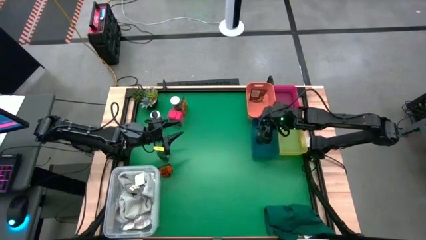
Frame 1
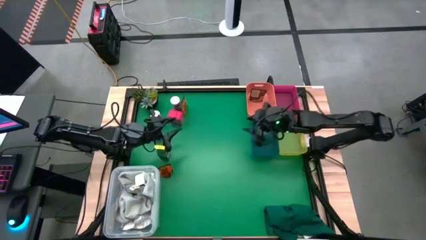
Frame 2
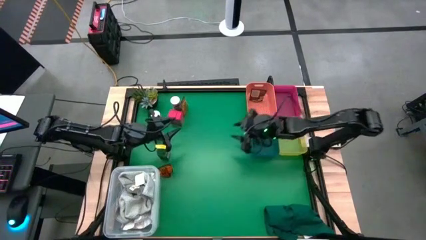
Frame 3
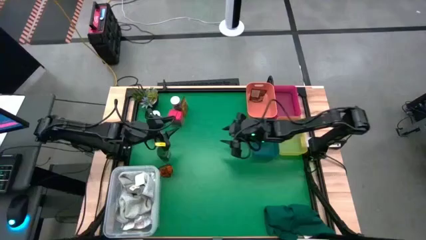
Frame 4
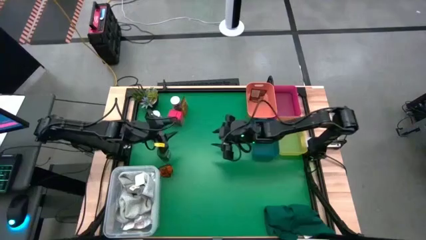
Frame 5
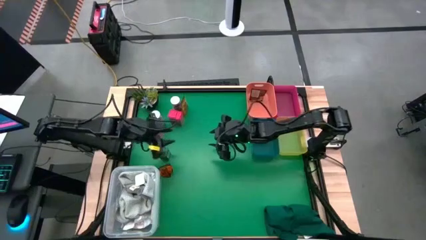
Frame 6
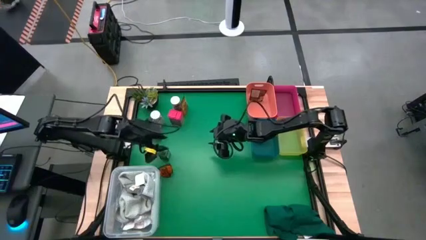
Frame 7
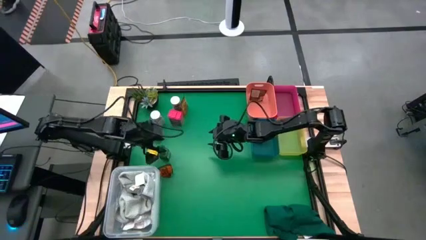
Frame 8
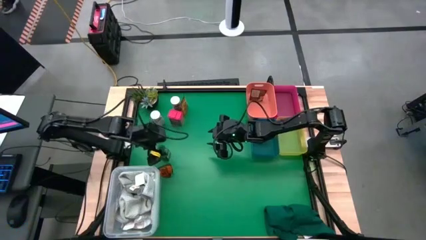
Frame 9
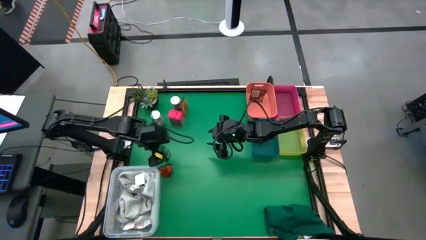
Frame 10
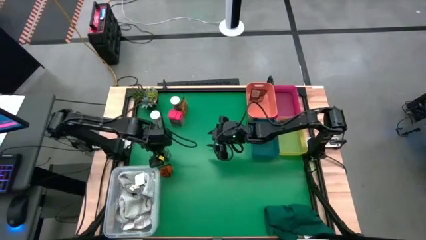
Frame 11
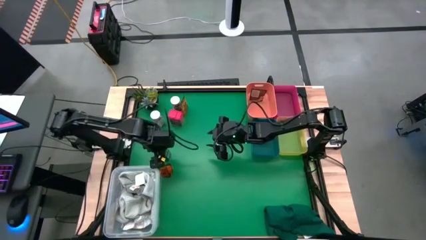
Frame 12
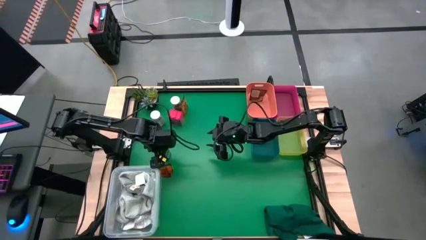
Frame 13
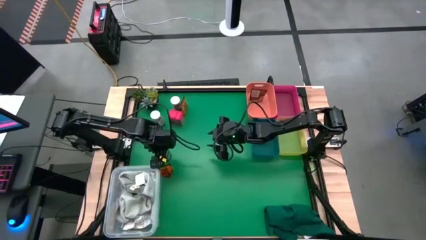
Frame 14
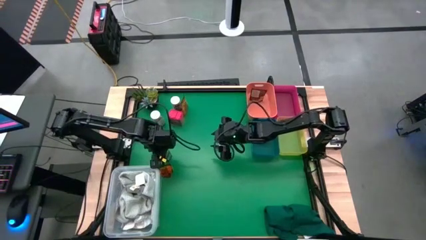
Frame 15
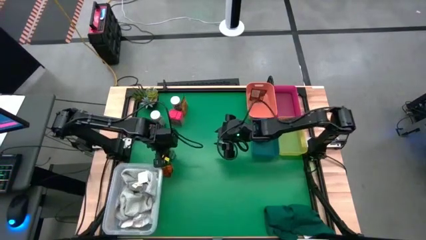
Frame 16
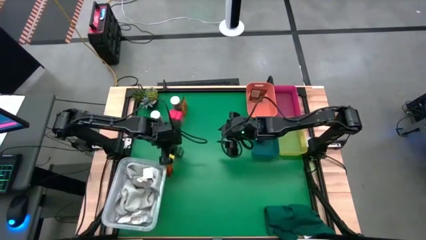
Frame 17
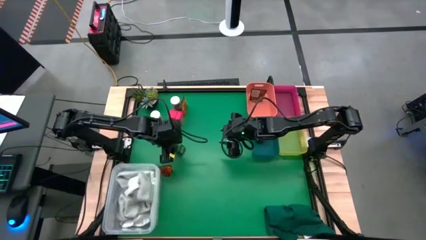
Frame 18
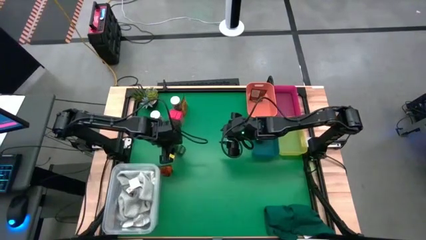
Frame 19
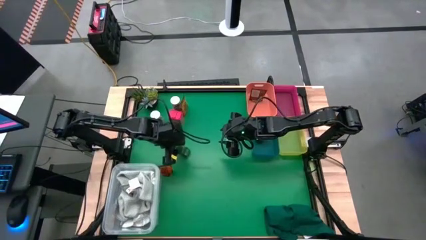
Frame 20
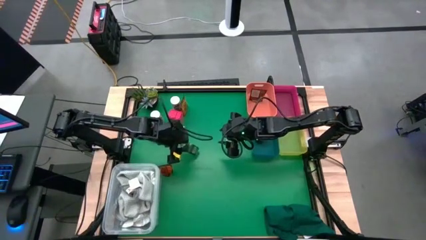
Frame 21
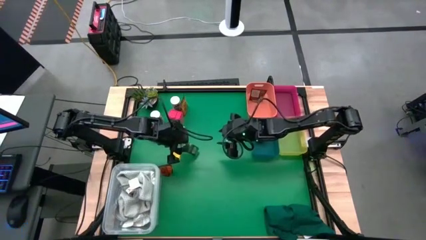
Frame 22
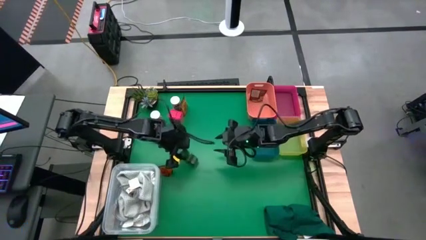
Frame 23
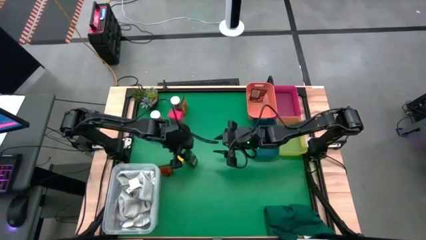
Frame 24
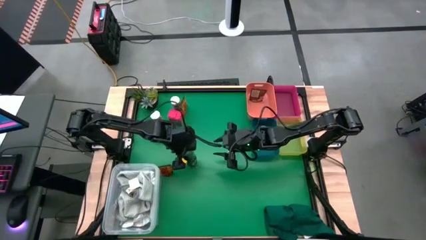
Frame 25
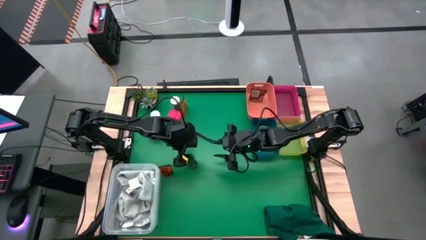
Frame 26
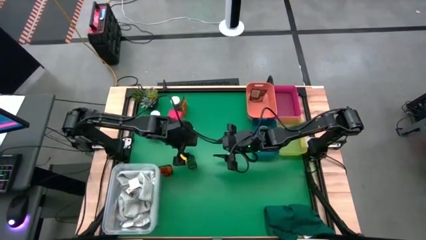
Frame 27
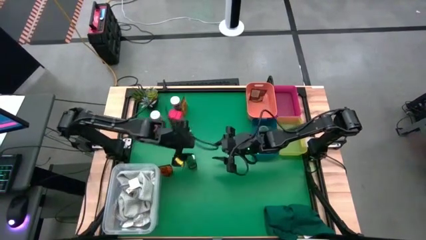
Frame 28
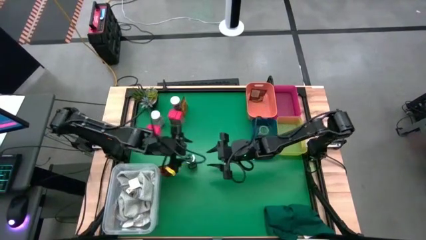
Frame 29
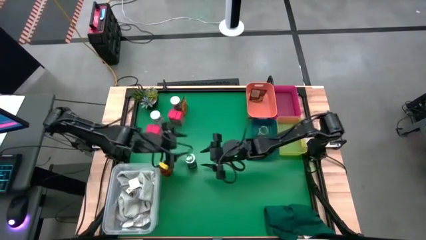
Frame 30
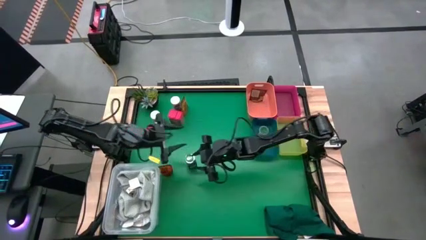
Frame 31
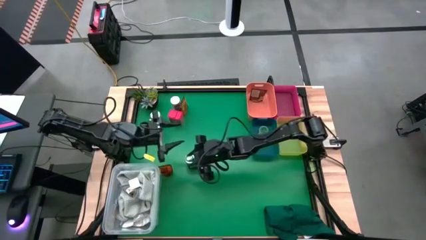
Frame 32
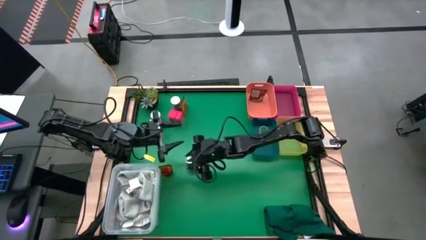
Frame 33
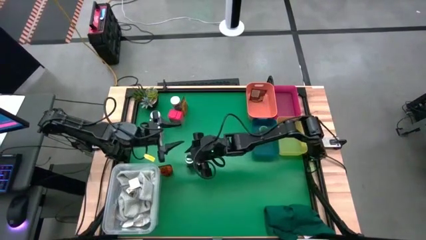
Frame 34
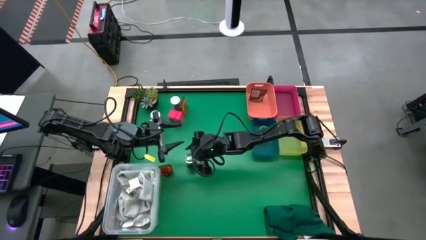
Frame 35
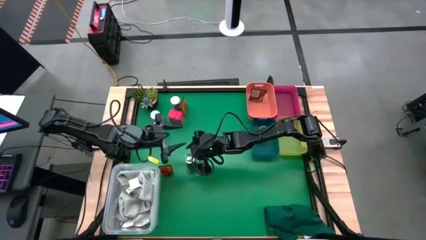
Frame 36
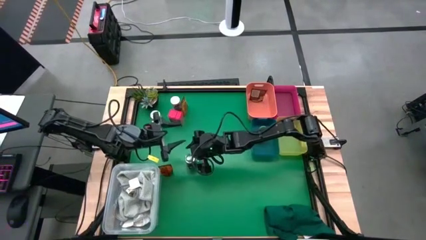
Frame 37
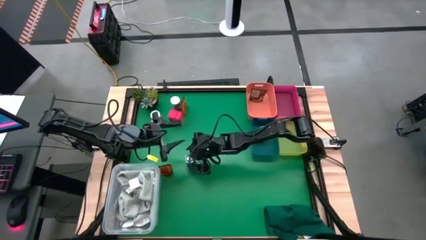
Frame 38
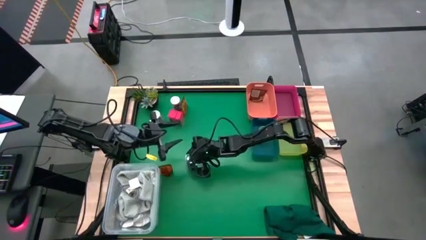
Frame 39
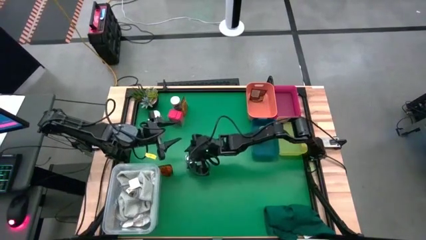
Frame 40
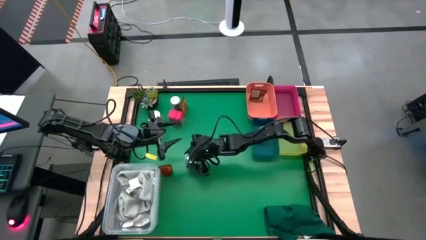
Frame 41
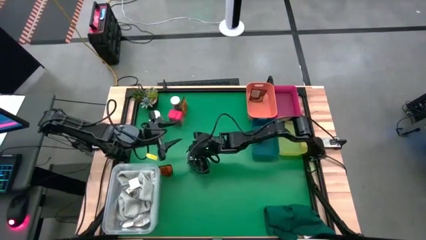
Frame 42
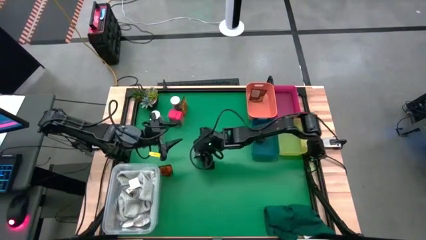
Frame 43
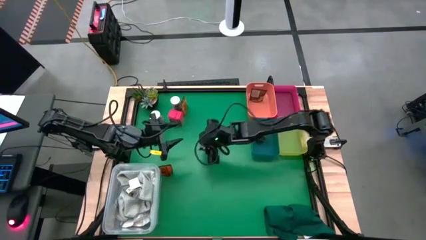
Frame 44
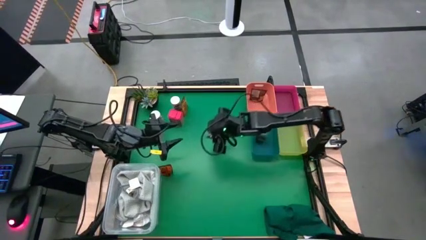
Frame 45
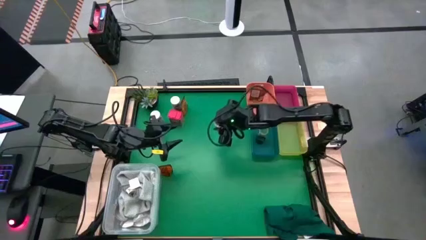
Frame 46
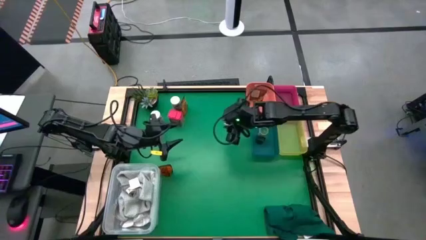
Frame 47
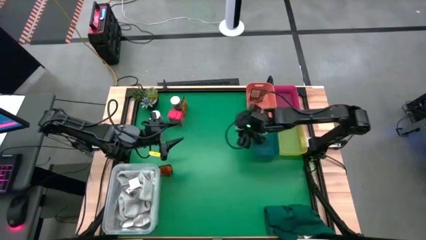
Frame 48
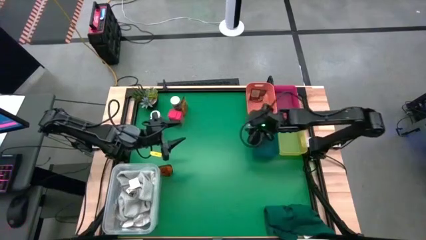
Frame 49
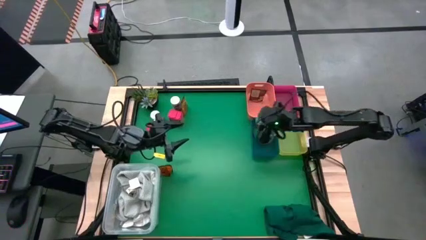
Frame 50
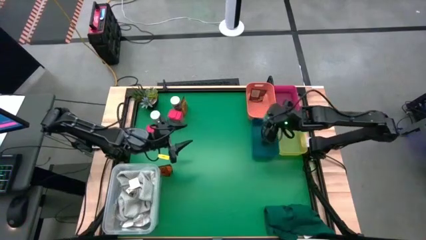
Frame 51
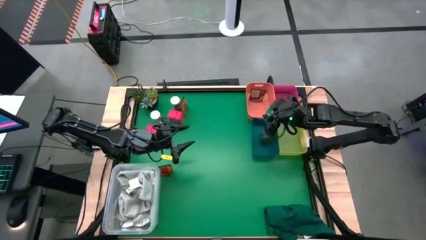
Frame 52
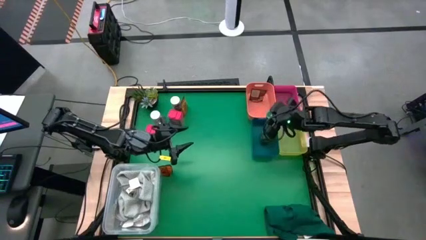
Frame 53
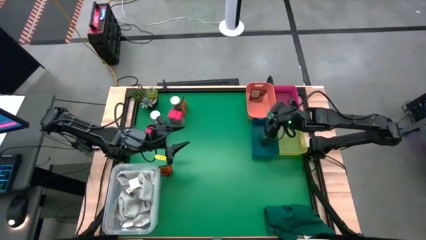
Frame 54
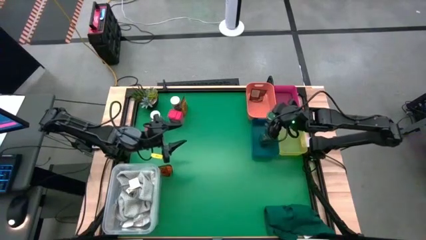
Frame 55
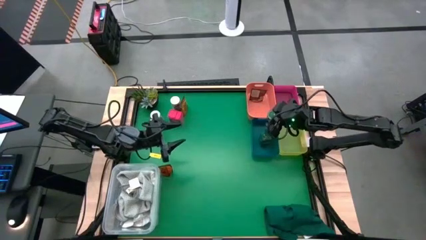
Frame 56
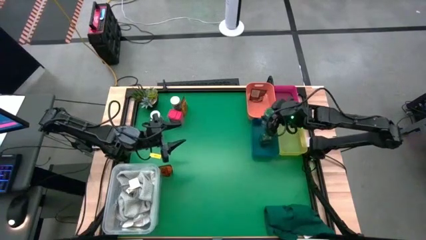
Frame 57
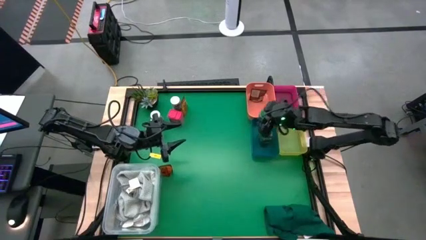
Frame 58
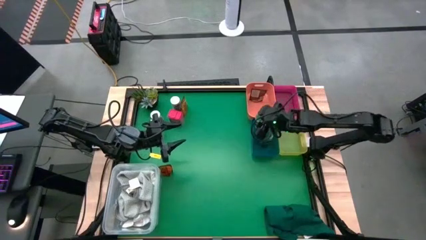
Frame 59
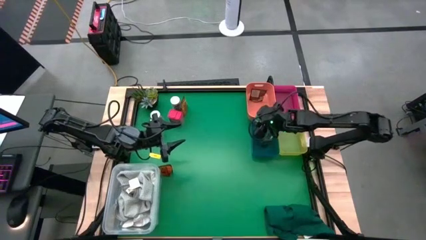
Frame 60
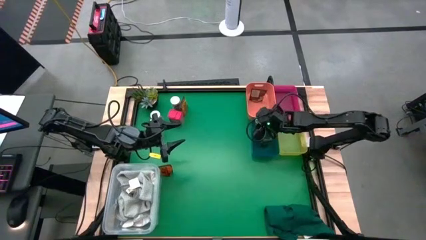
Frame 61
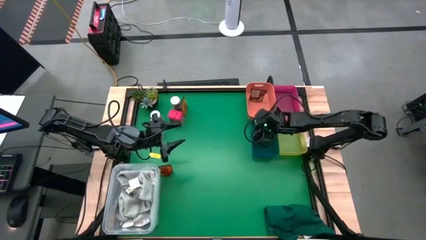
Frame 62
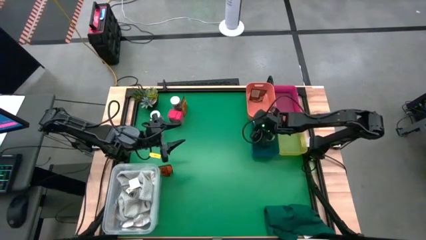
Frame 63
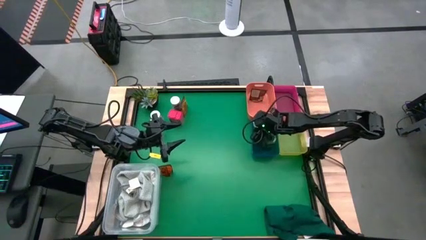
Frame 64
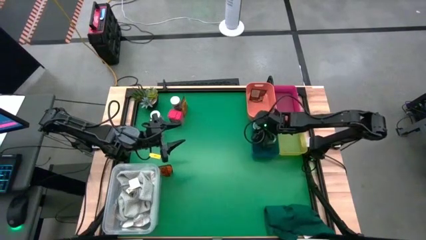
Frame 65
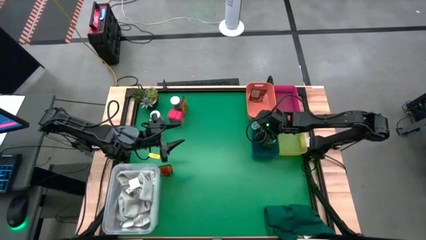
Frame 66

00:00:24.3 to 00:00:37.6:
Task: Sort spices by type
Put the green seasoning bottle into the blue bin

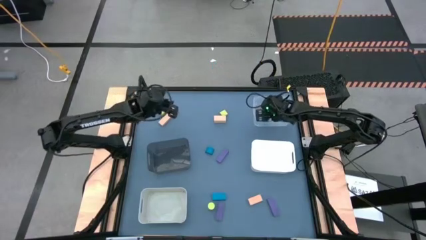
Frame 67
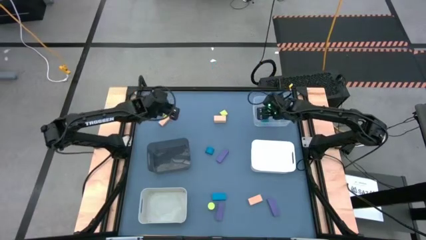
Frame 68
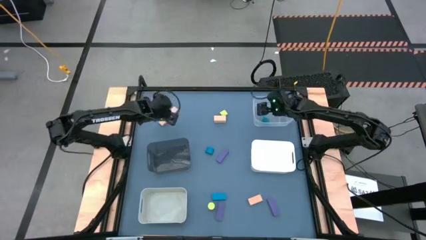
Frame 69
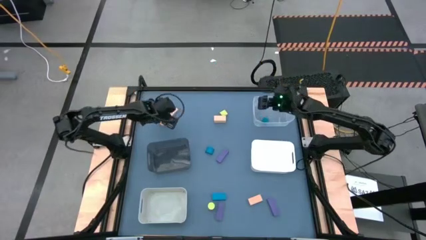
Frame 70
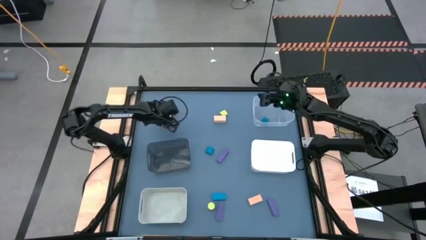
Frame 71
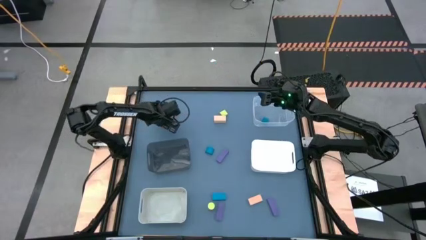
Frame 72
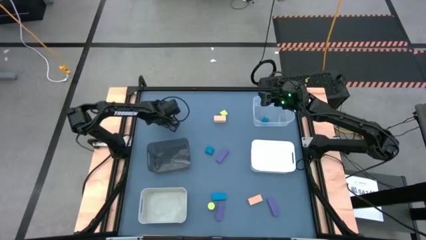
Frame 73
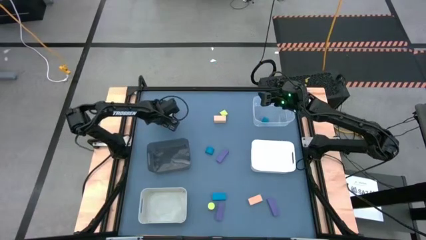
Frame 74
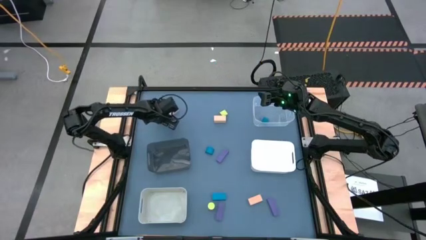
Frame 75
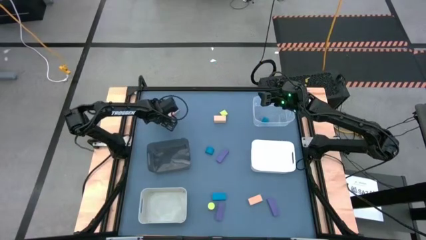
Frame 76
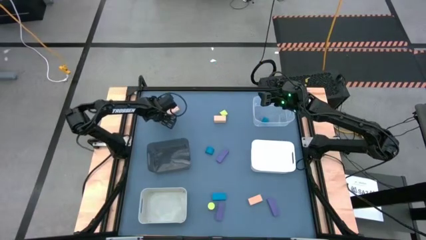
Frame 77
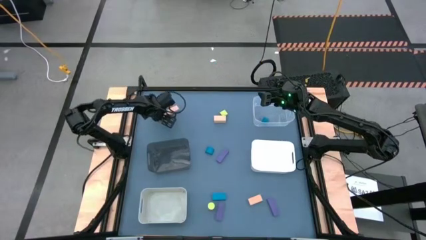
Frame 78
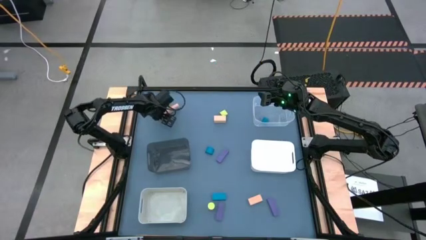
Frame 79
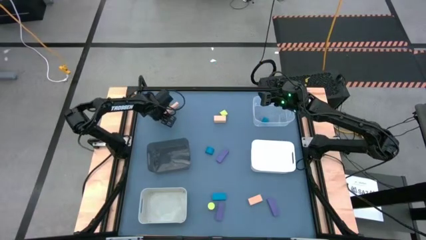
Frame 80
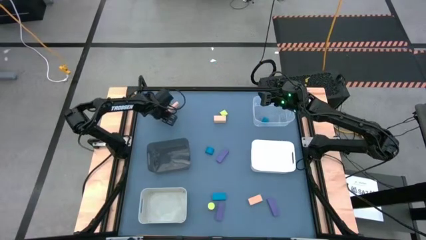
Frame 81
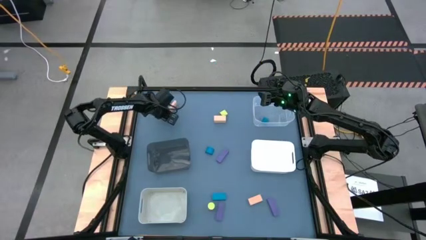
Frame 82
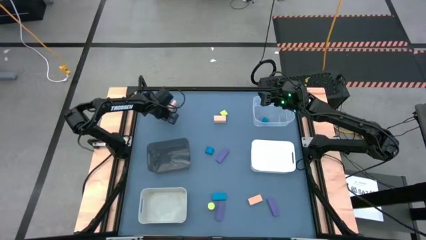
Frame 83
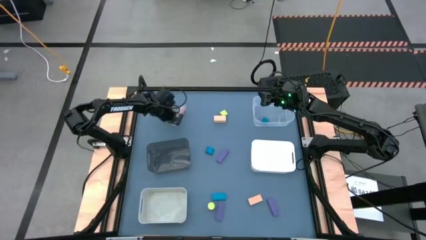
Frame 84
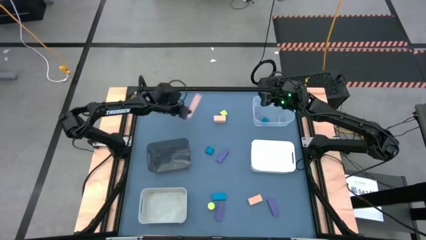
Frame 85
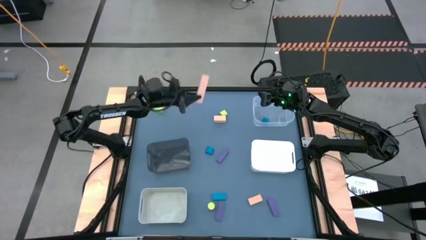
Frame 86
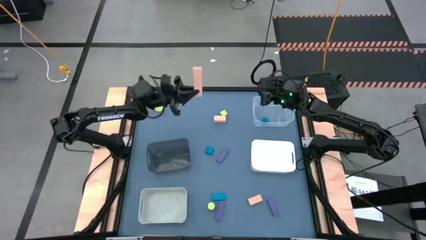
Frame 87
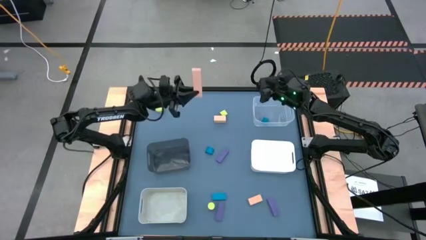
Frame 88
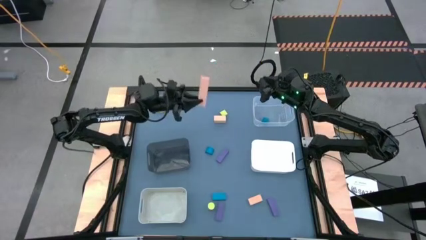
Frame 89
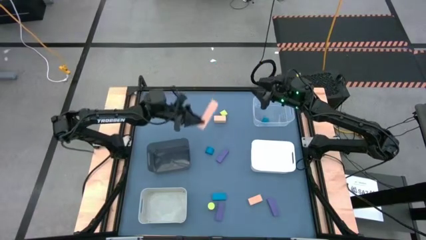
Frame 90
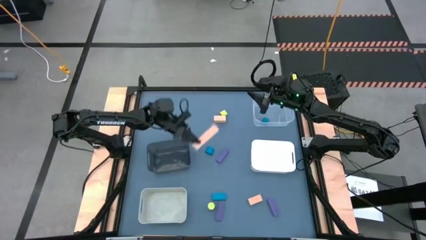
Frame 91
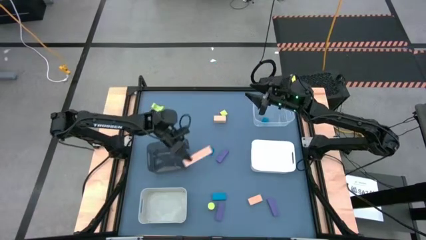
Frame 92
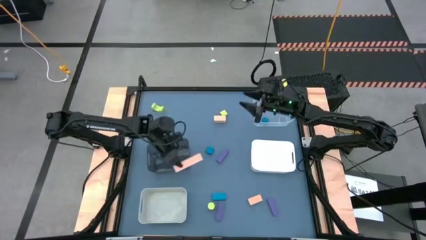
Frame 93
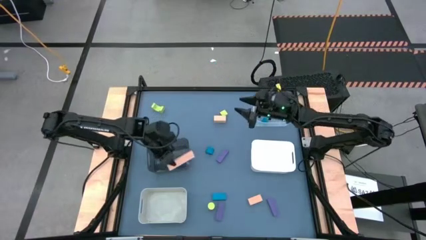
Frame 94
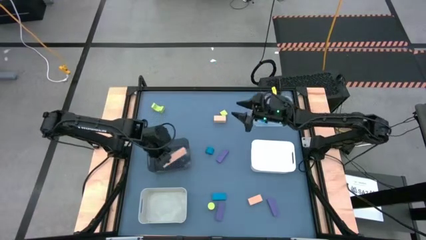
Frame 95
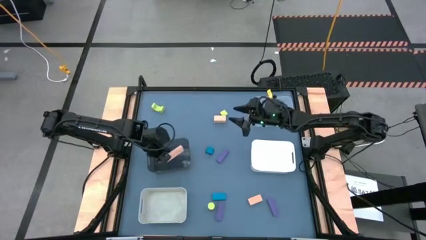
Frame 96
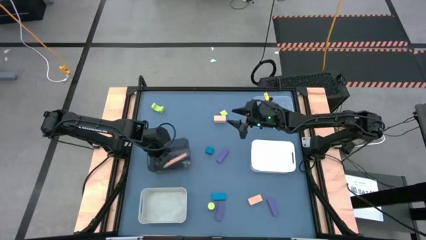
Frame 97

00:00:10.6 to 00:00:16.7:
Task: Sort & place blocks by color
Put the top left orange block into the black bin
